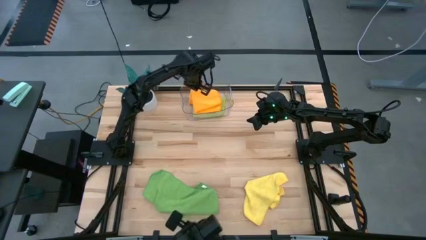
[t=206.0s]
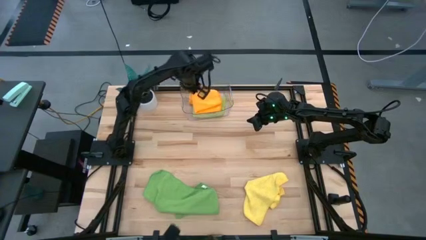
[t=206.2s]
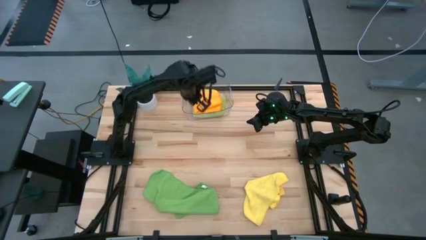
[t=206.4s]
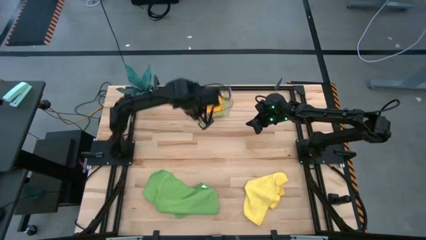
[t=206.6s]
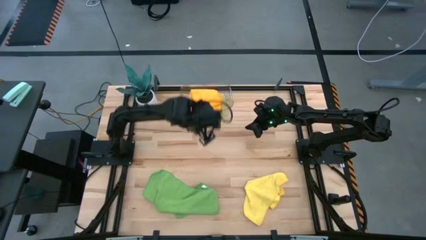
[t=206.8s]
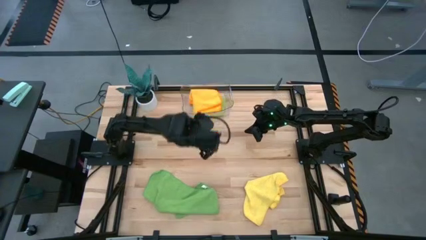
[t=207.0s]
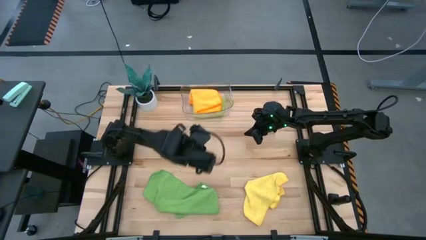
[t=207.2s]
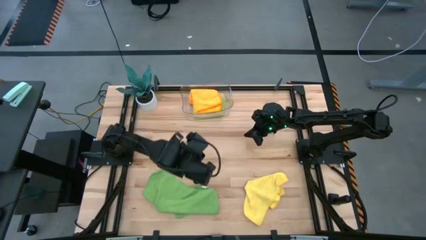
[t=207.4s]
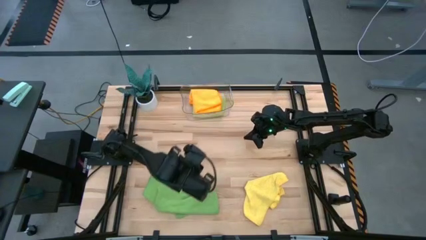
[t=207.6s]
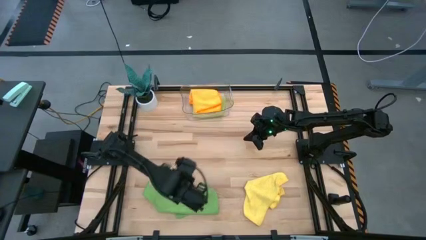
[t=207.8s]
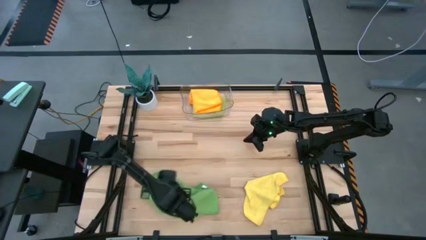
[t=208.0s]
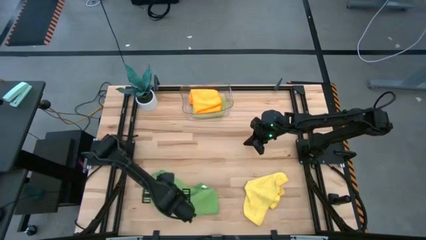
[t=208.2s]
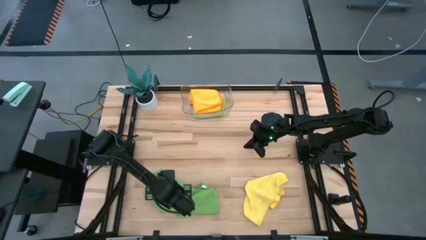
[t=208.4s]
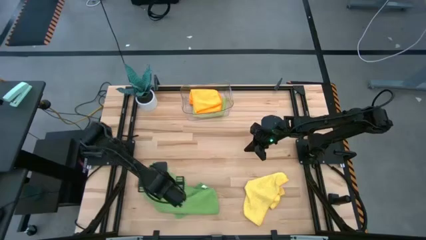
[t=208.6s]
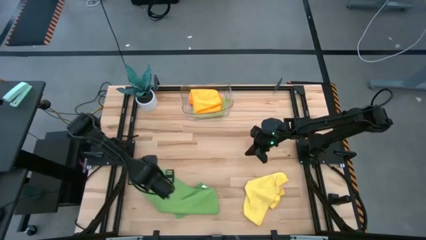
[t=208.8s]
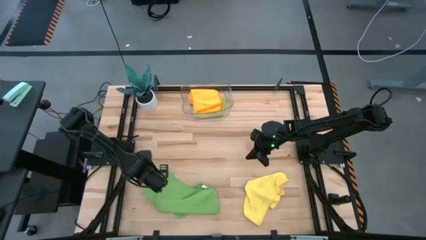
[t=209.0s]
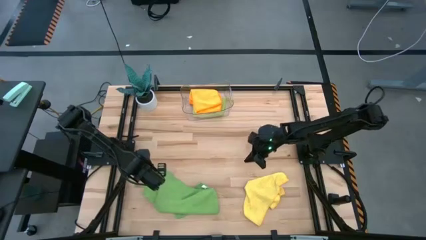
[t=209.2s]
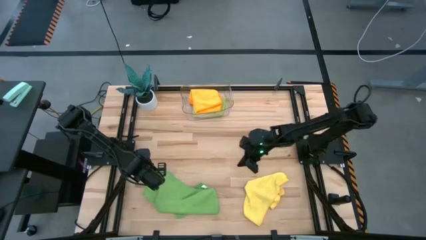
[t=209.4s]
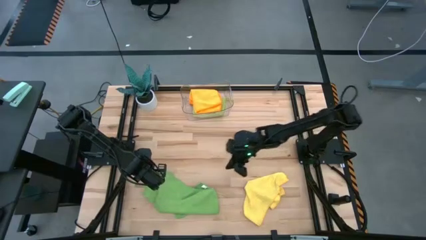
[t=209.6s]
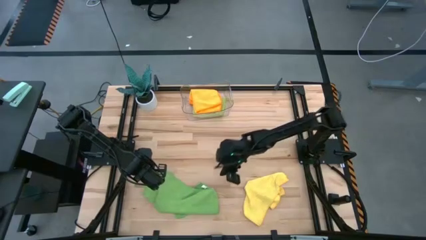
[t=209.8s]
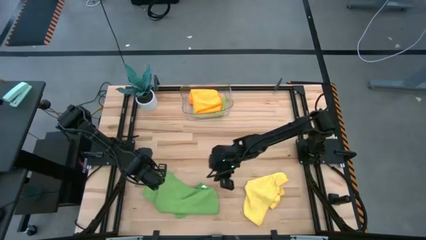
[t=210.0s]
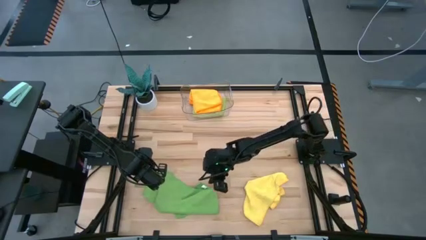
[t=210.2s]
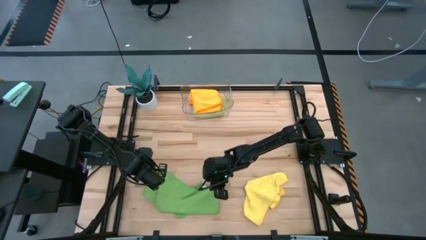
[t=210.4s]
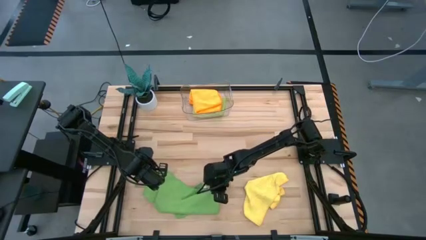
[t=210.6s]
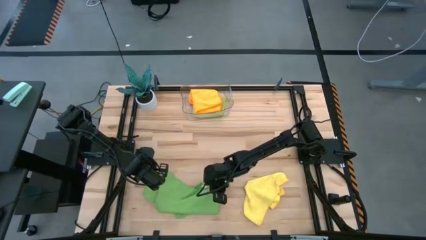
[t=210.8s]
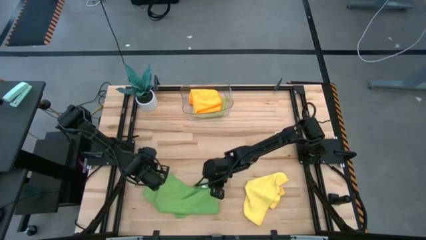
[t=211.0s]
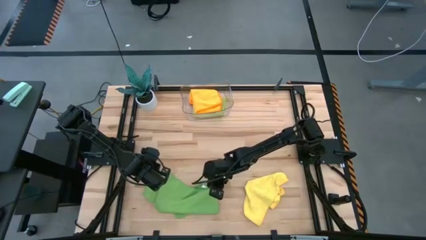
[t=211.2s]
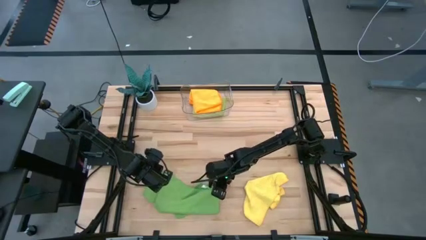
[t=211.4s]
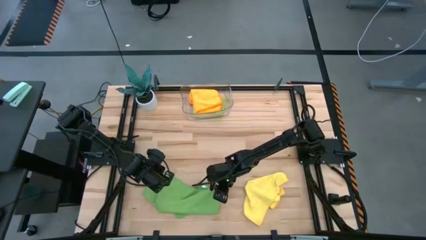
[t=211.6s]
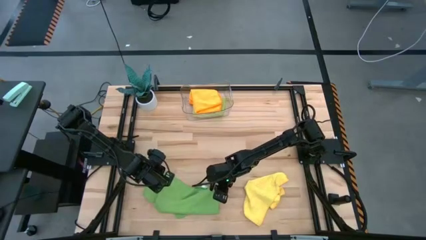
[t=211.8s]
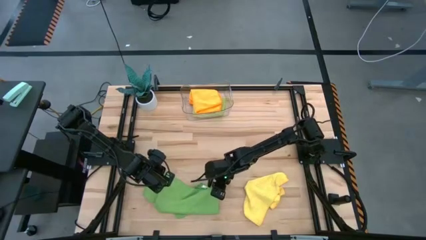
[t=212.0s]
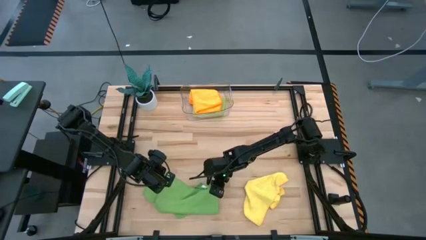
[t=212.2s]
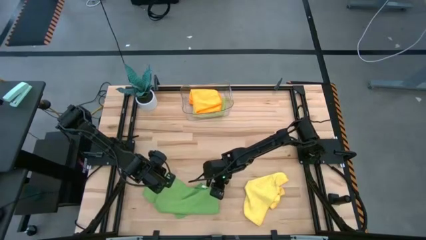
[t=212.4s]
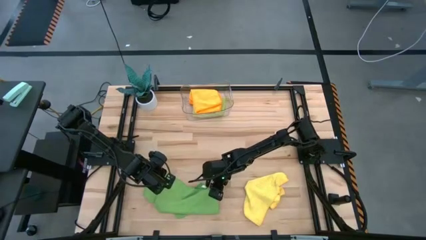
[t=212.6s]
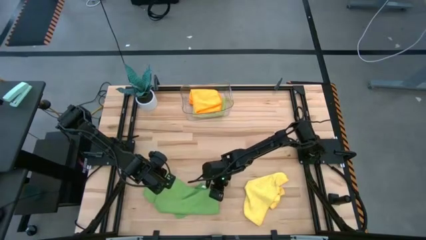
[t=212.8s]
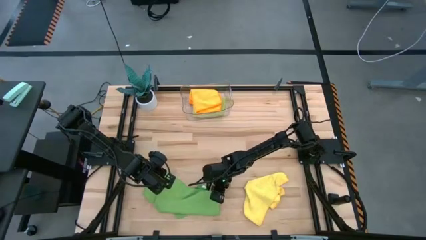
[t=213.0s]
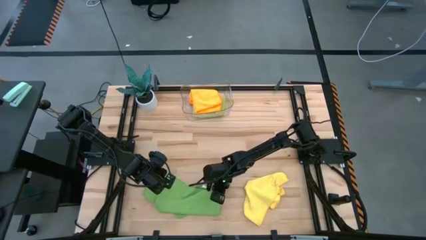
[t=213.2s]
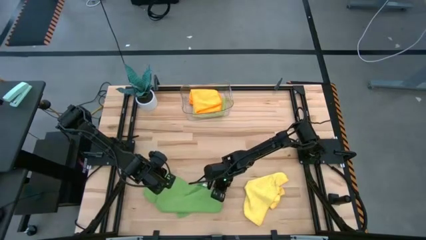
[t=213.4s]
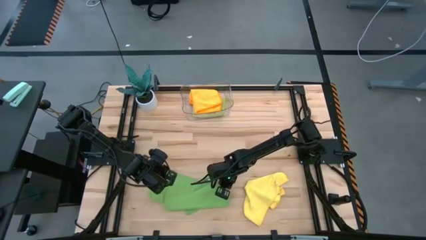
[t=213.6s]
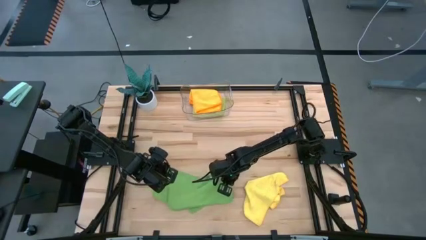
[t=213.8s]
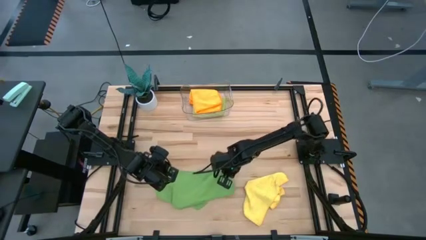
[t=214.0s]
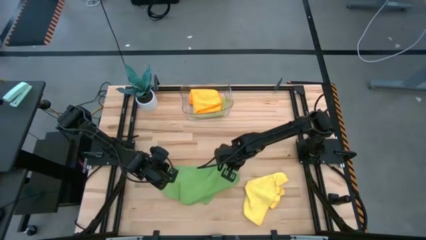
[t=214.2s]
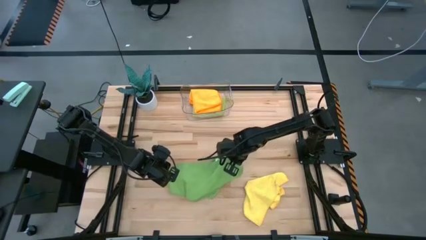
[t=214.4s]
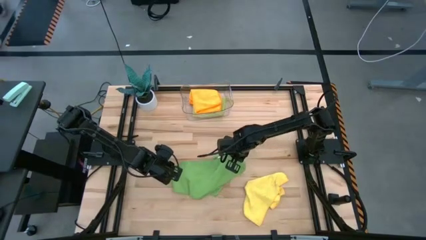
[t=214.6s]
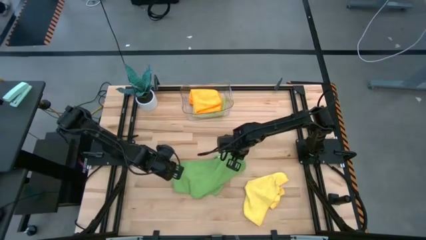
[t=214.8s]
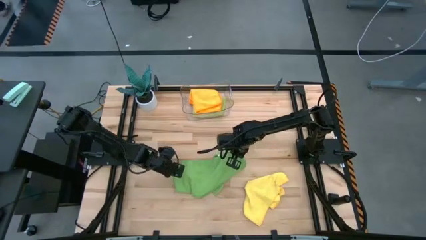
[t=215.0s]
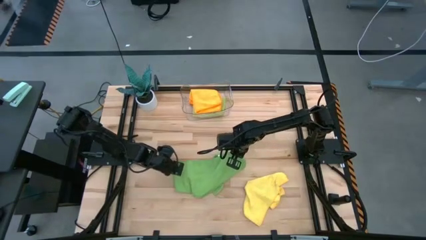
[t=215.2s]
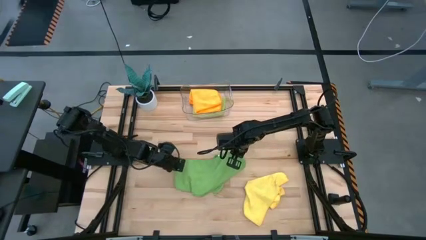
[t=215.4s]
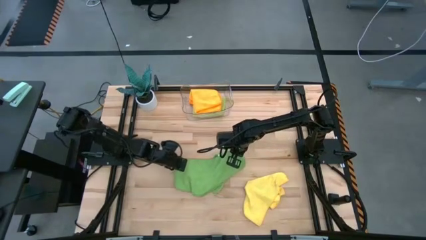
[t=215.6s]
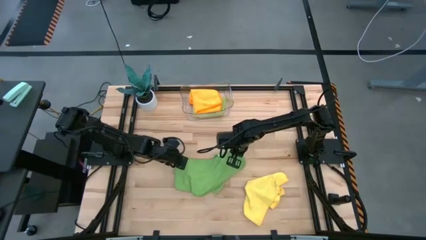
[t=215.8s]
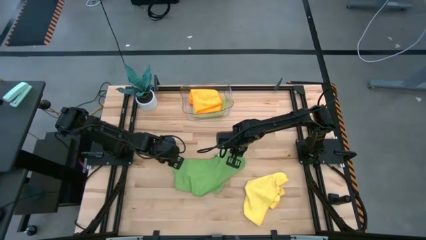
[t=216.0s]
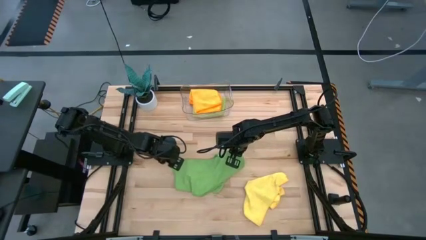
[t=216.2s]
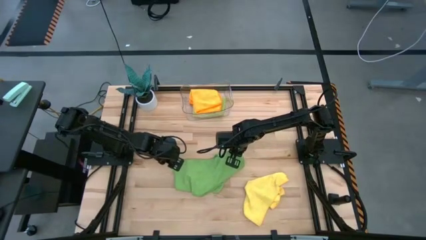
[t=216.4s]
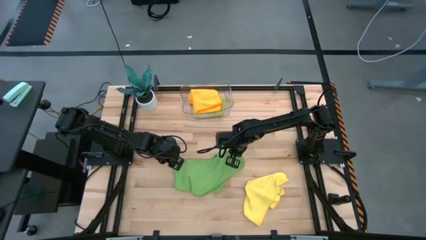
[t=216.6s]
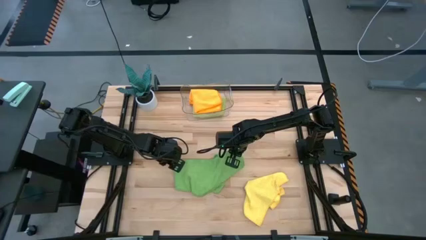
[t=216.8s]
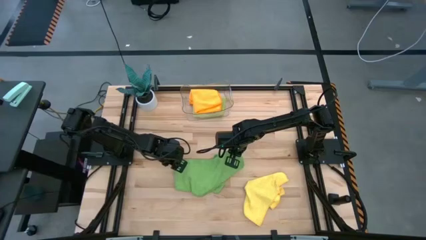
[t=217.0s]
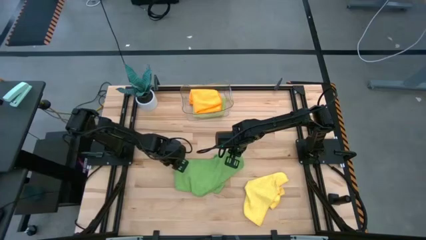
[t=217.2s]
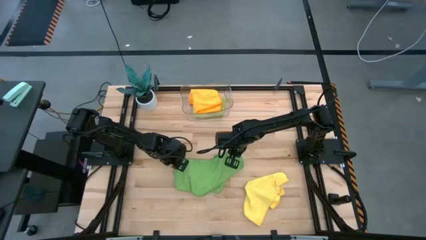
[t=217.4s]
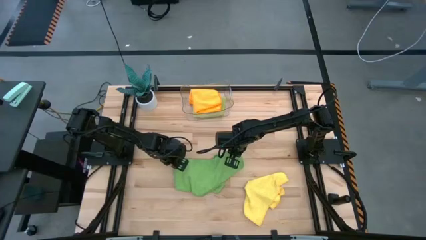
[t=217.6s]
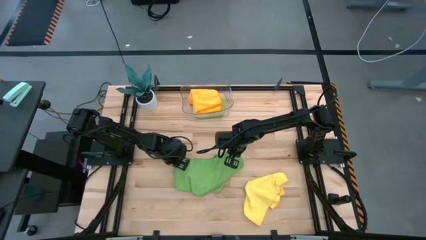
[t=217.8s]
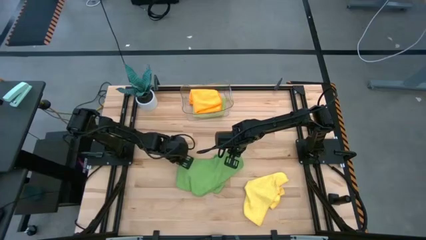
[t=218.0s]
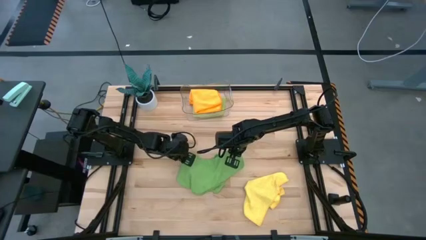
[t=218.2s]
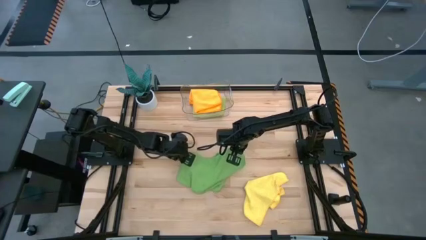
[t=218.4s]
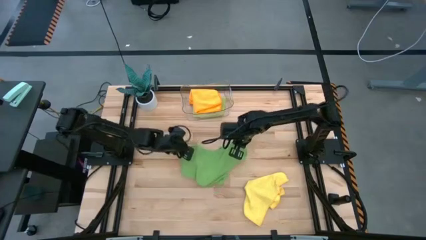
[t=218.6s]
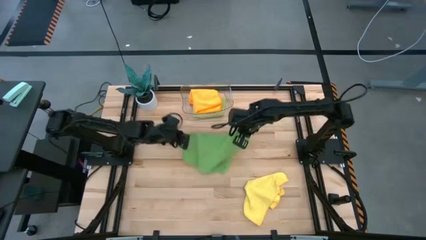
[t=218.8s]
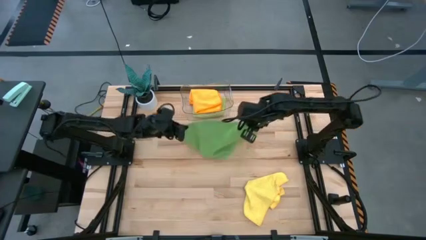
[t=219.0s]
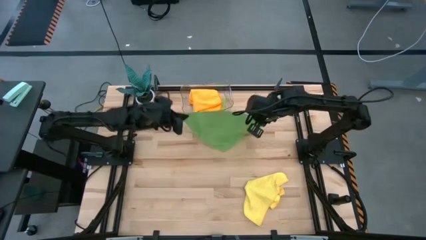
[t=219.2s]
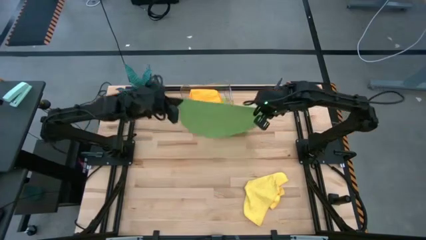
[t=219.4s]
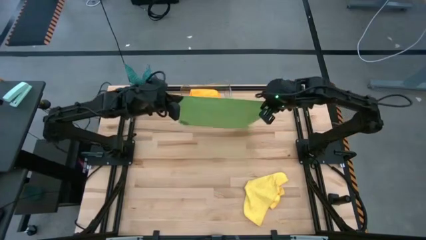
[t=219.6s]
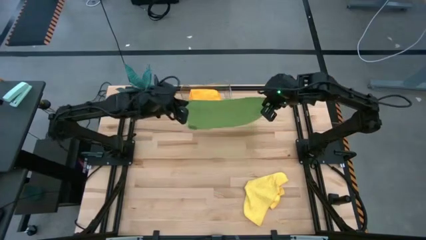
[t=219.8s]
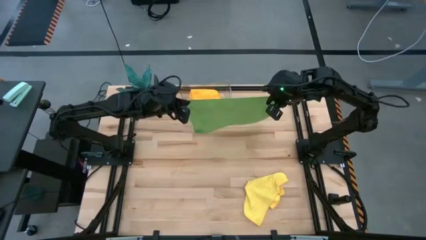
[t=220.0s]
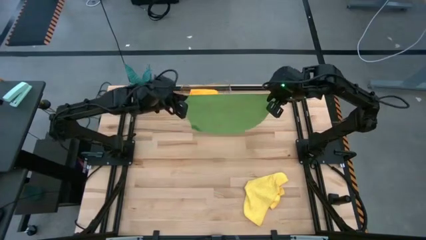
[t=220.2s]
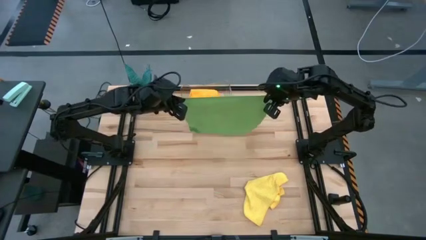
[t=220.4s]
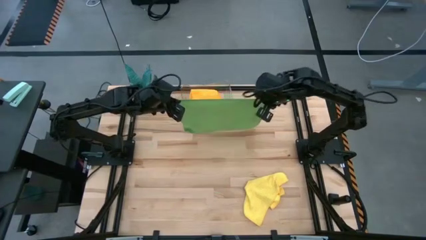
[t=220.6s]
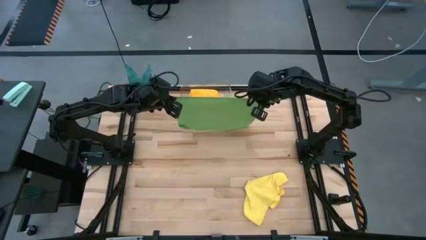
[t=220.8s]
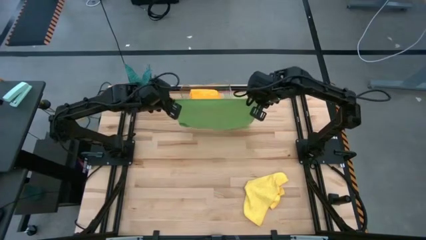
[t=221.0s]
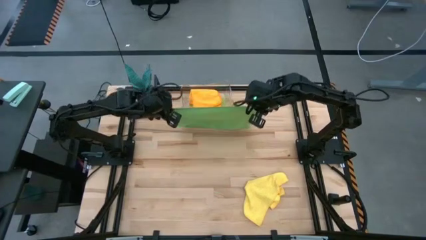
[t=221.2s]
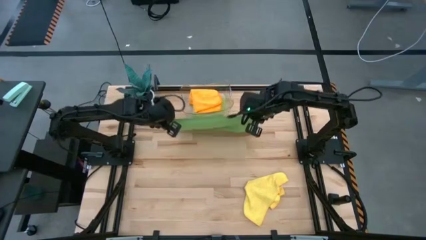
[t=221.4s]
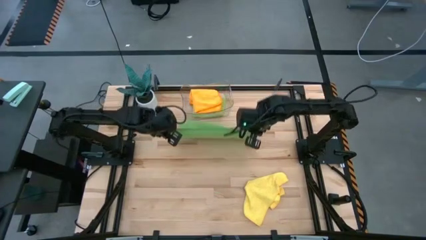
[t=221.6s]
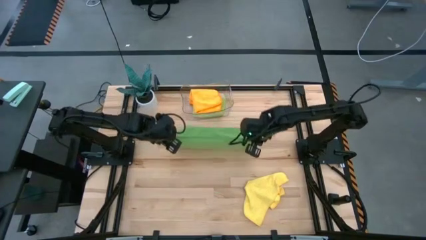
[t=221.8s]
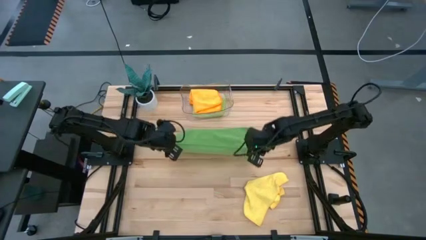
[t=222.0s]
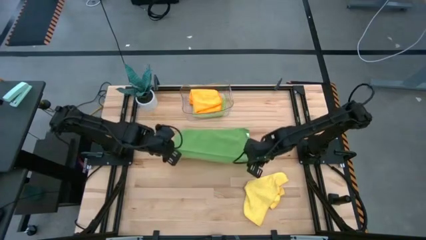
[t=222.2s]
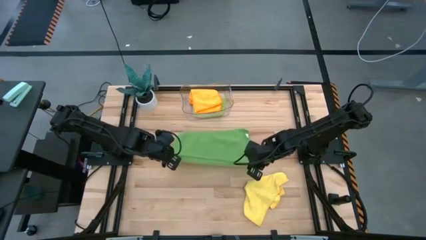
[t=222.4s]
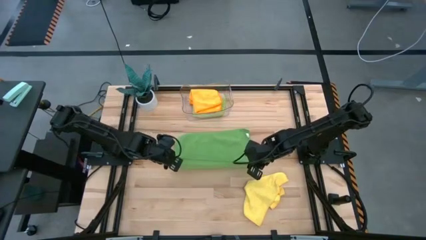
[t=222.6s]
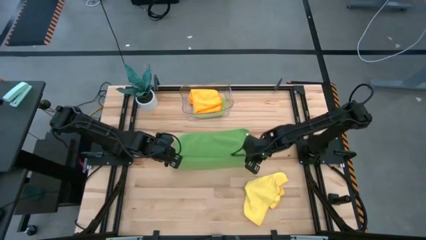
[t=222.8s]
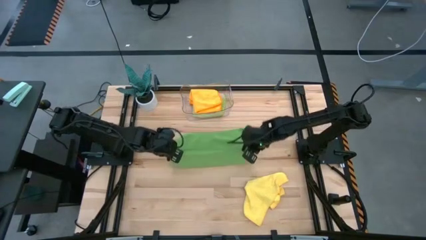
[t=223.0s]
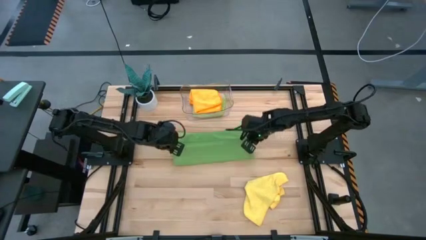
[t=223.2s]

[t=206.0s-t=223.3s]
Task: Fold microfiber towels
Fold the green microfiber cloth
